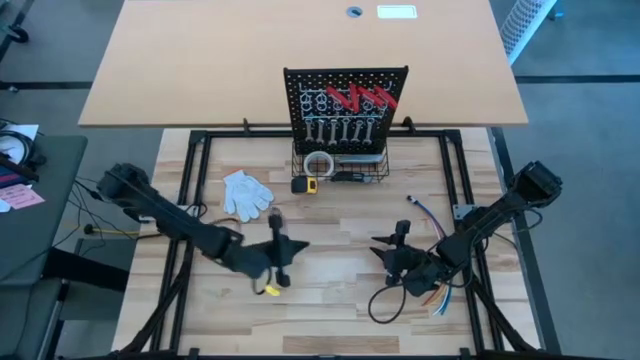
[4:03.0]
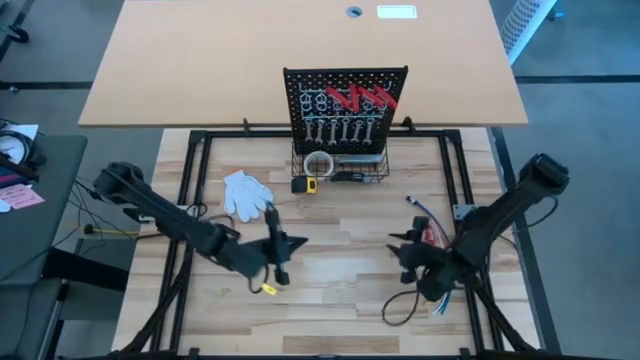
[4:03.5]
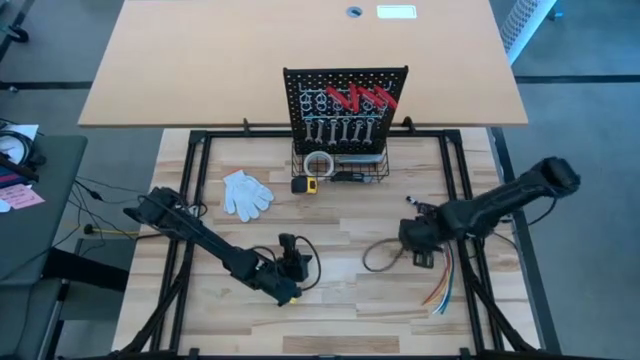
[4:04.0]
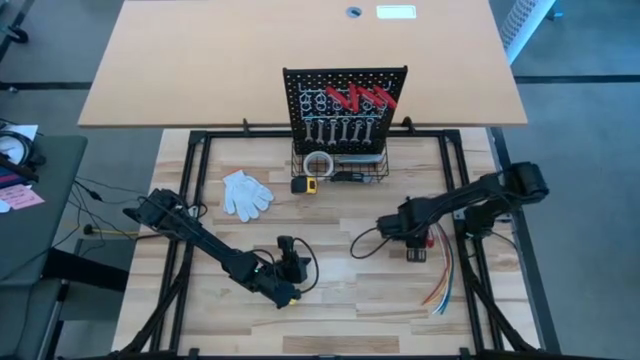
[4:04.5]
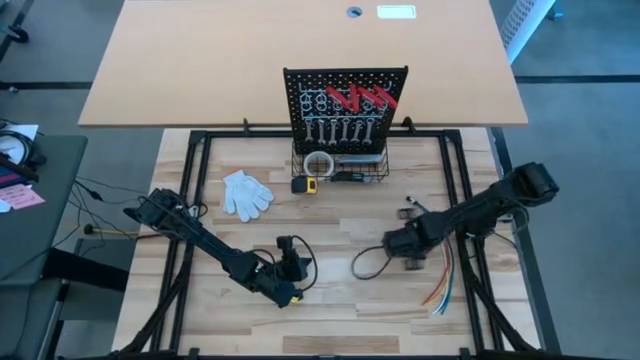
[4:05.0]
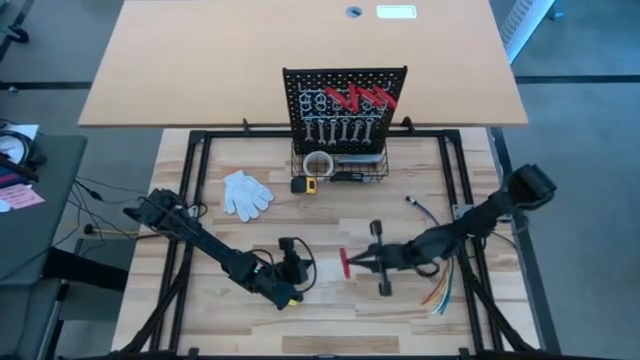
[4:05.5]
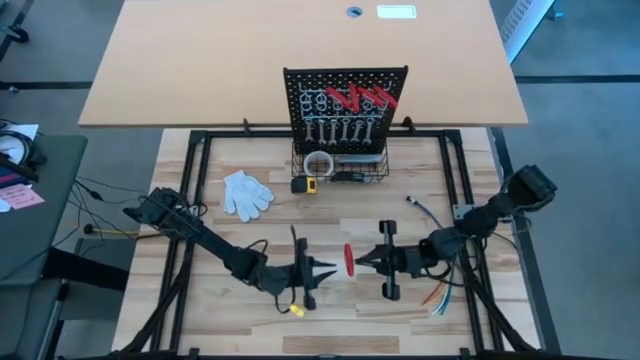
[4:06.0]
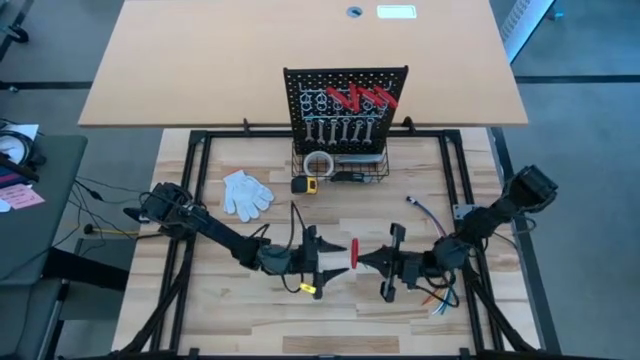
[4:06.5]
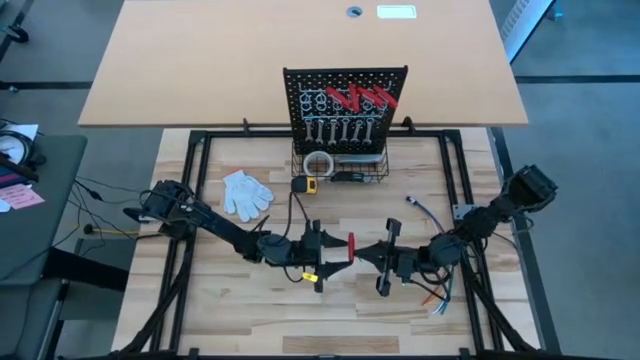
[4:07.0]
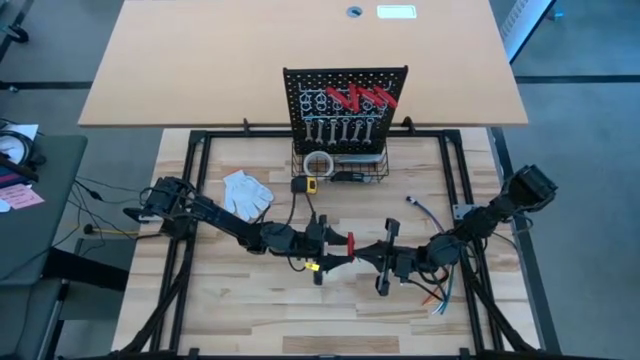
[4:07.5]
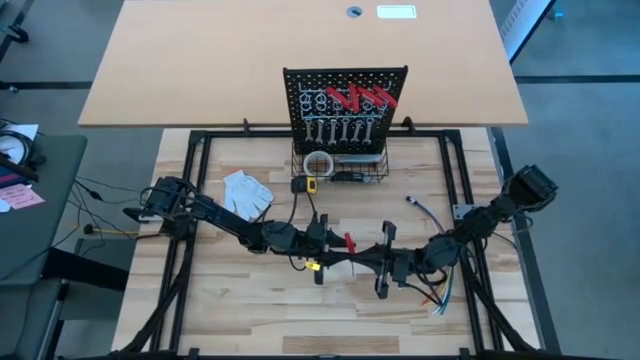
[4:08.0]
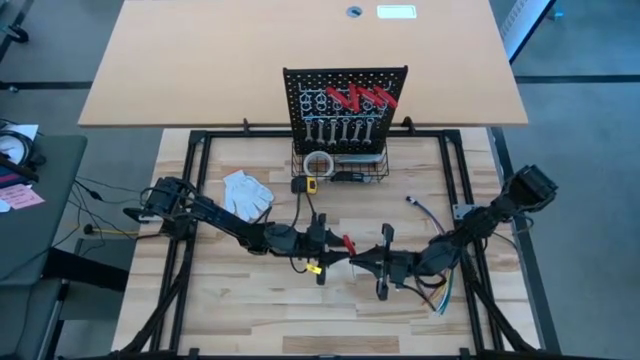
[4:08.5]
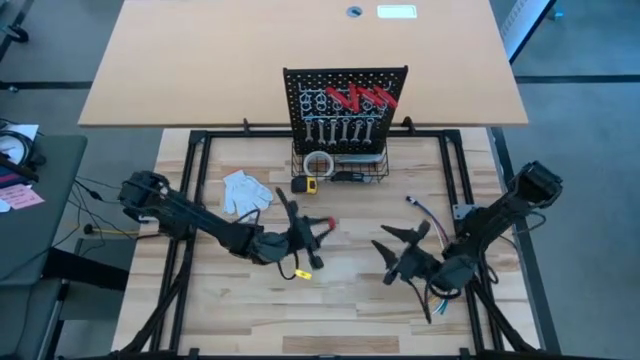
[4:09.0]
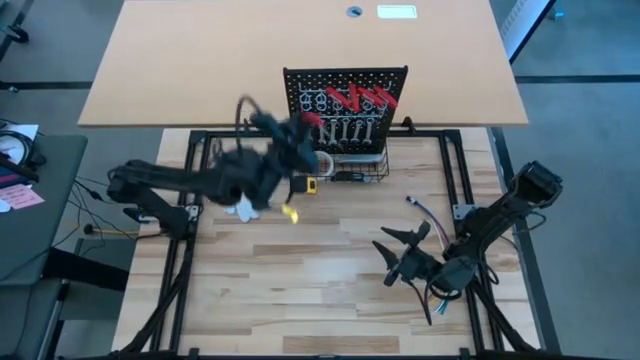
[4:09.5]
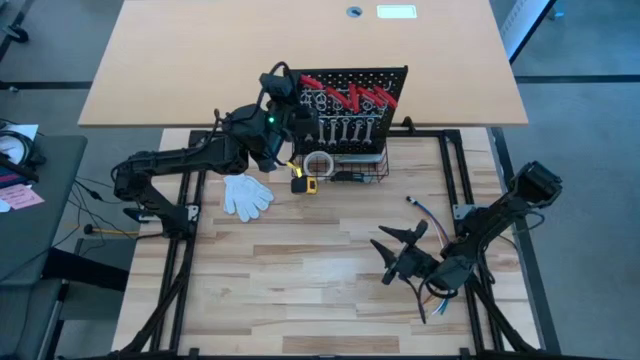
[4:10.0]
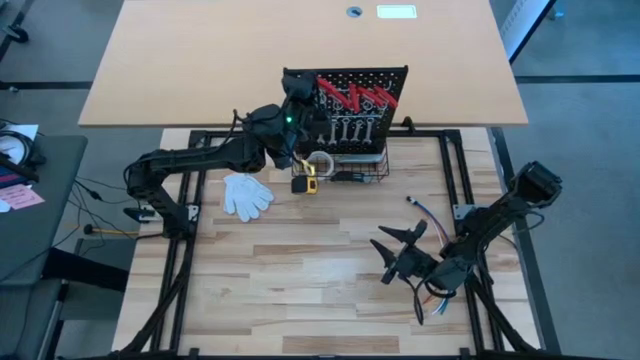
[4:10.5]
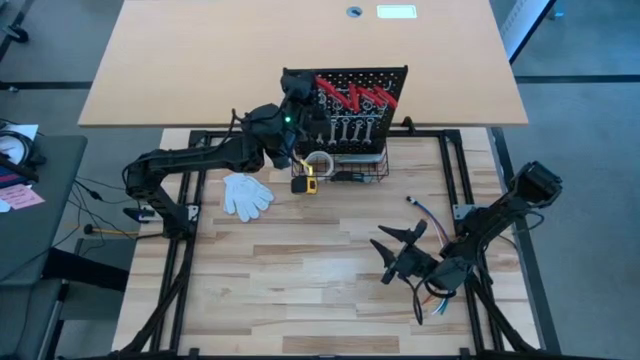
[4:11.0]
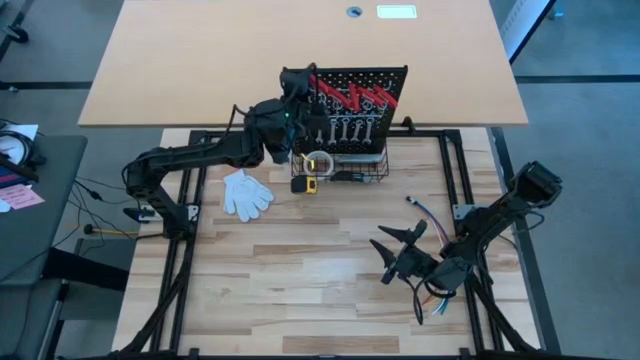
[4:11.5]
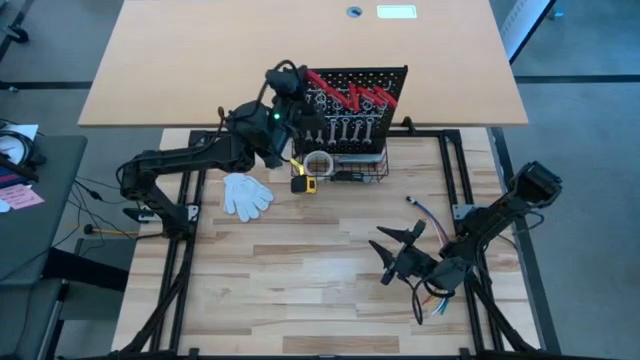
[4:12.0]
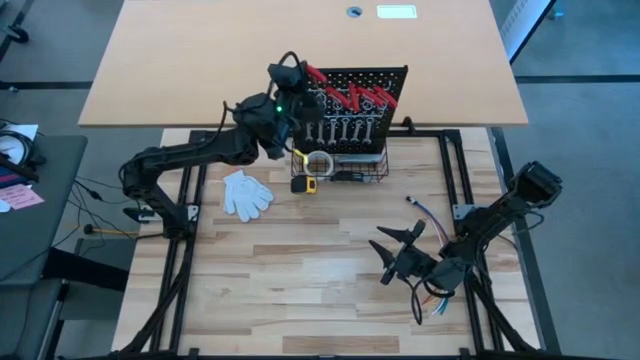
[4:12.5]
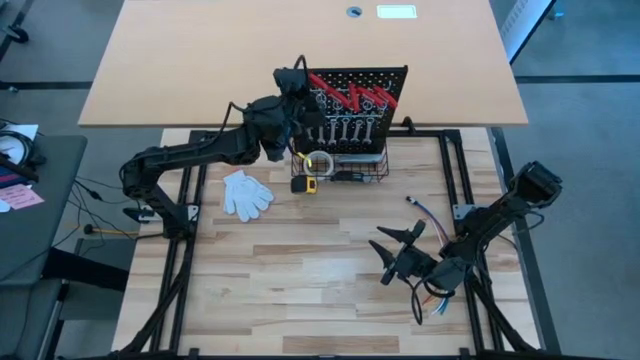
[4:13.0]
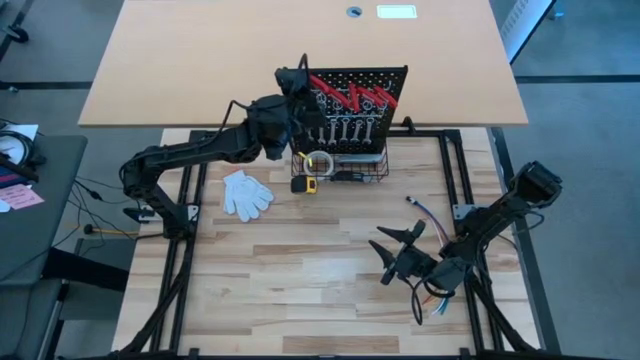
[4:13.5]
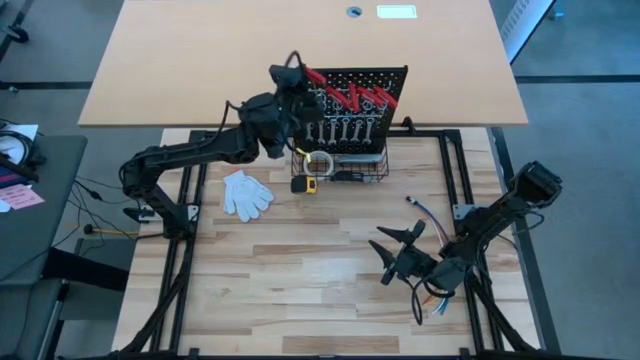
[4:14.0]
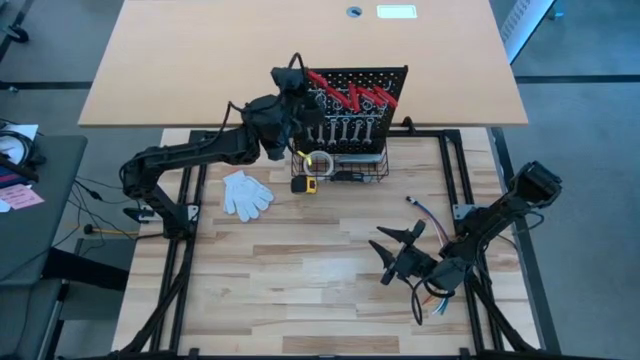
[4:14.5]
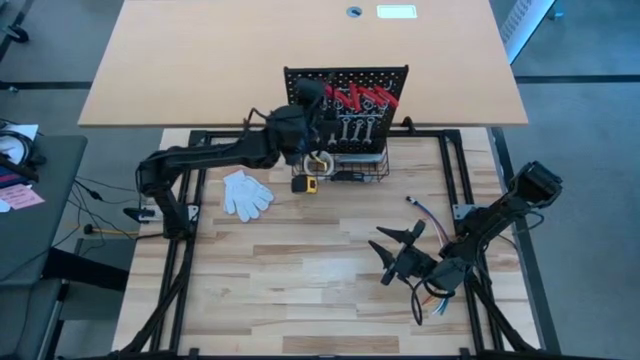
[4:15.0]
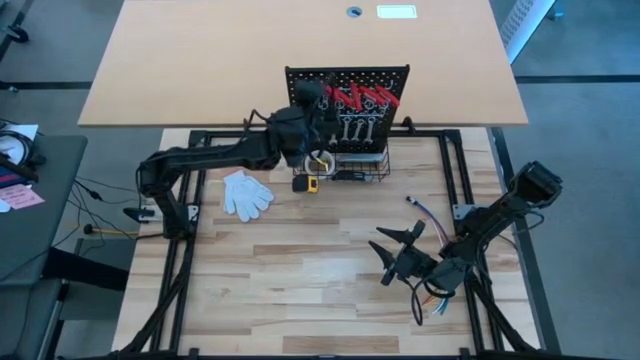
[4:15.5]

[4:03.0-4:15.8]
Task: Hang tools onto peg board
Hang the red allen wrench on the peg board

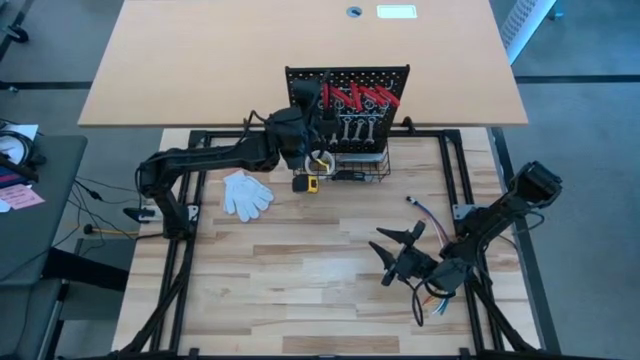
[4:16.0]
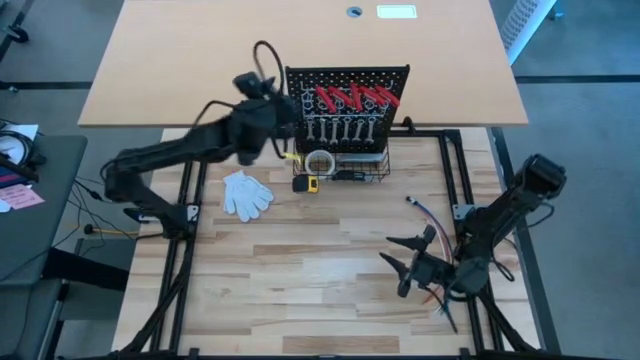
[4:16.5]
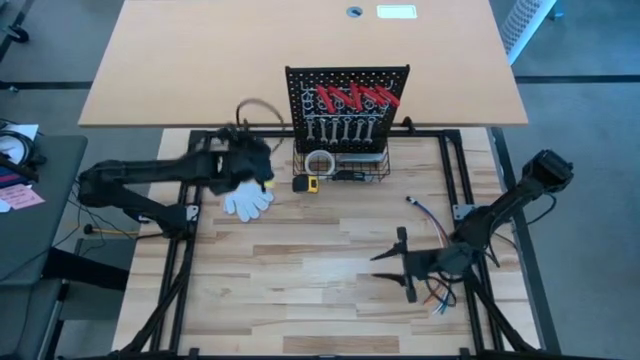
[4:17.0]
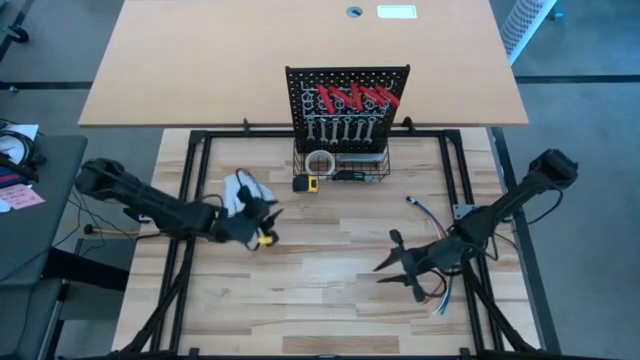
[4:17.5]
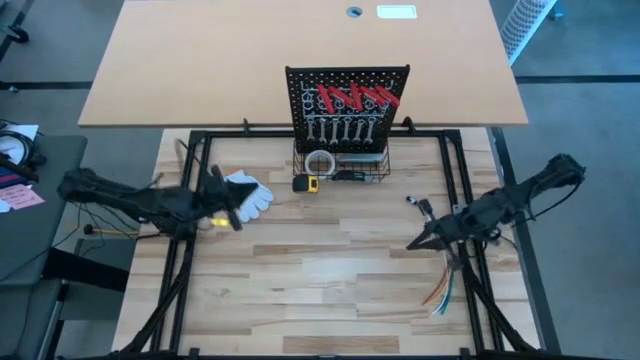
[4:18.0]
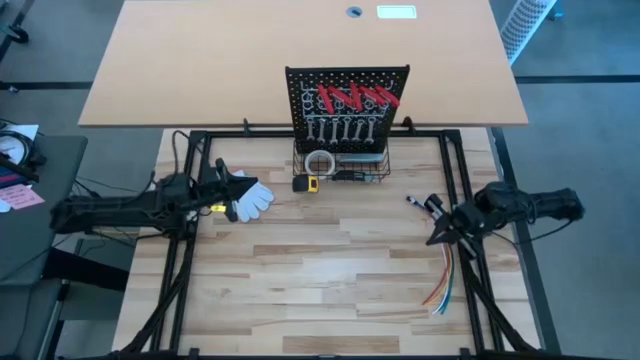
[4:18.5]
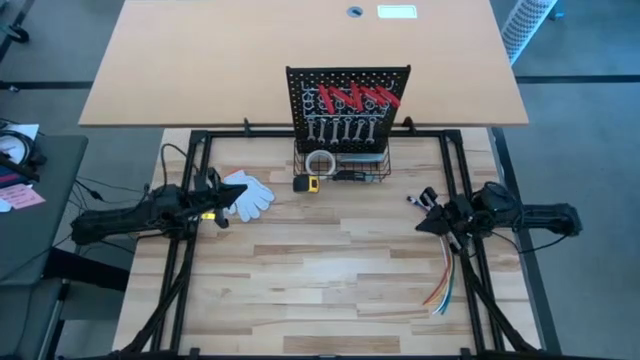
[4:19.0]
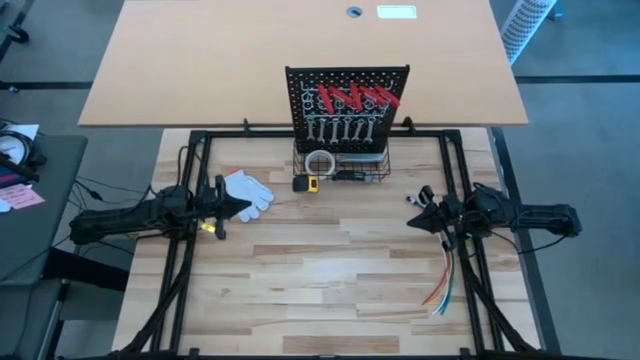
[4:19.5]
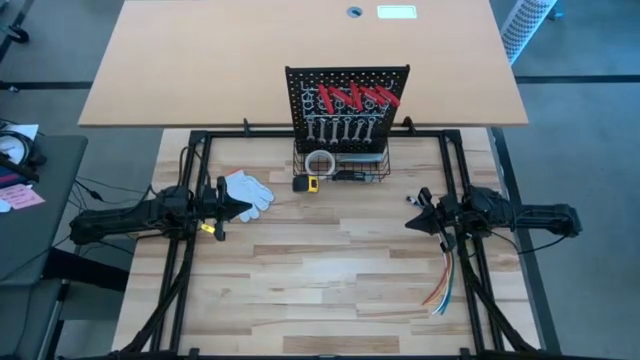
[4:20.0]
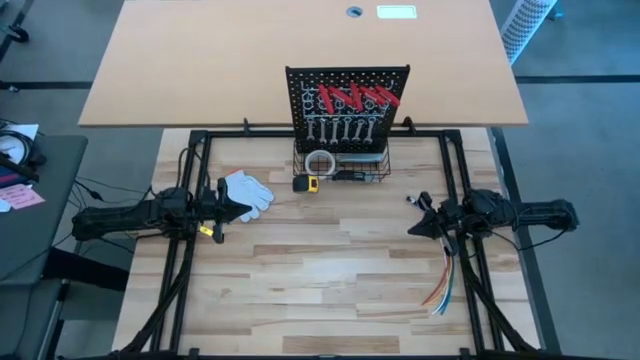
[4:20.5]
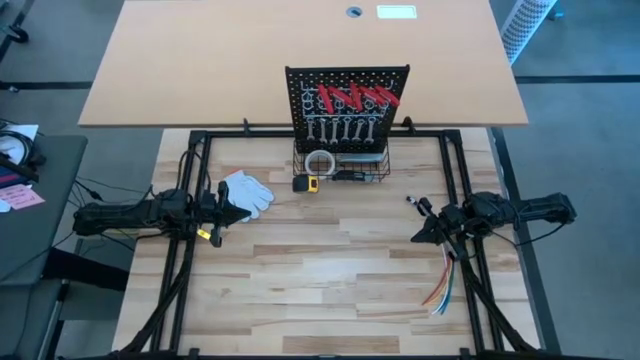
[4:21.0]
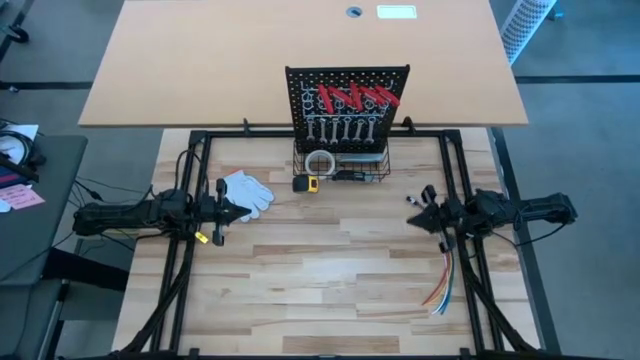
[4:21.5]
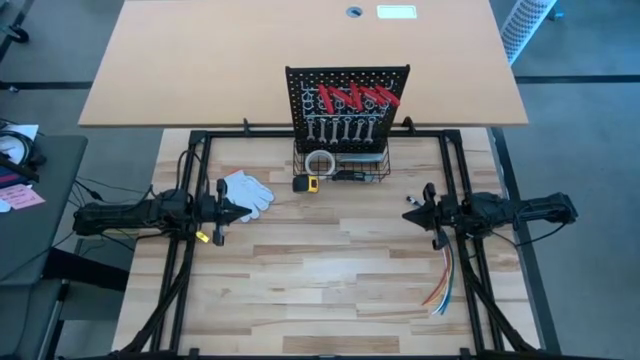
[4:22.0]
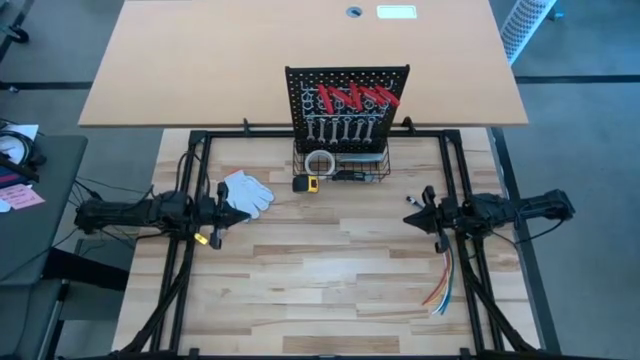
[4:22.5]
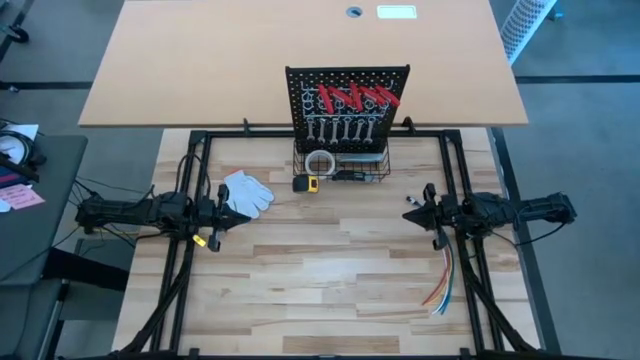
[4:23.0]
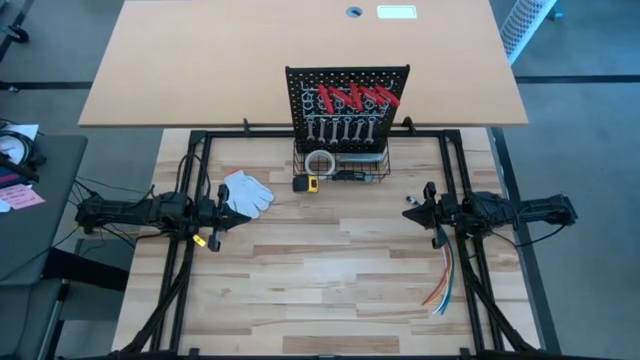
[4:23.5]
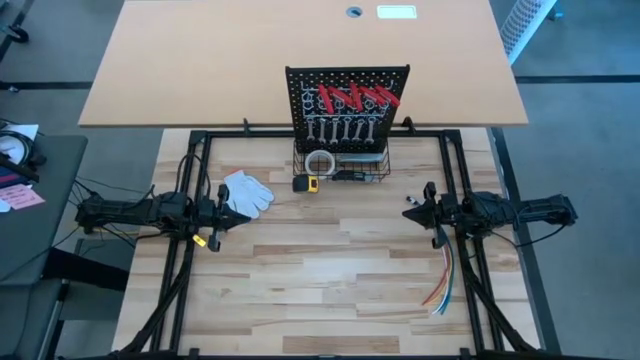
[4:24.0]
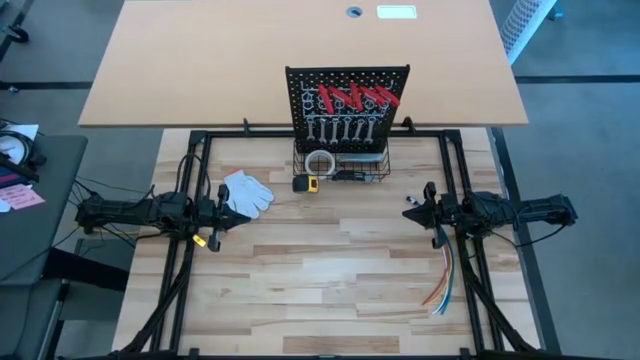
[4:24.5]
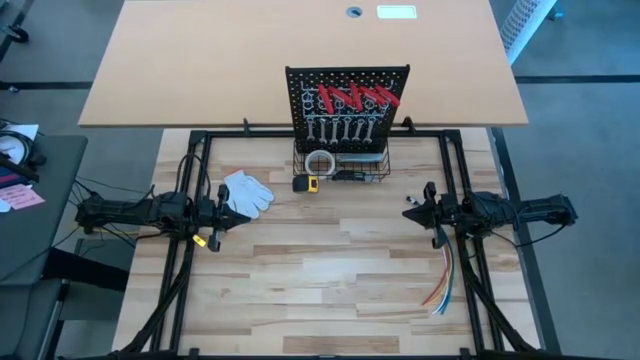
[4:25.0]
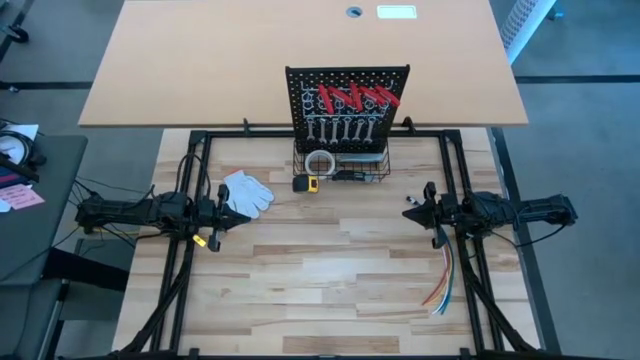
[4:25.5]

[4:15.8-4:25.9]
Return to Home Position
